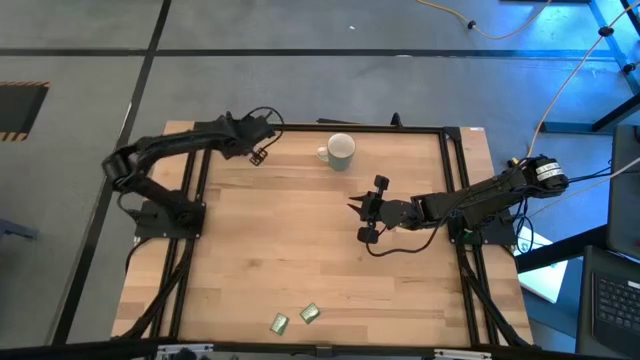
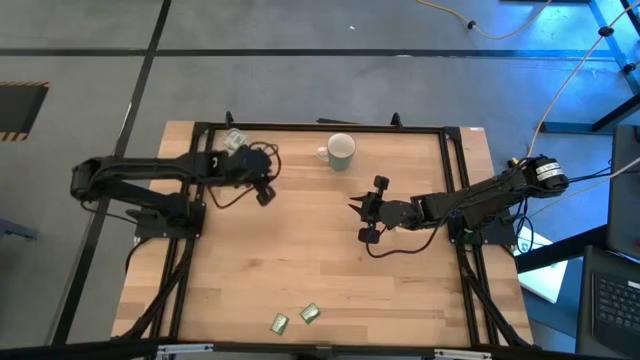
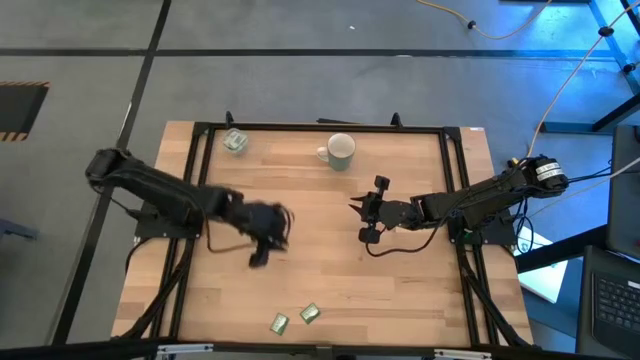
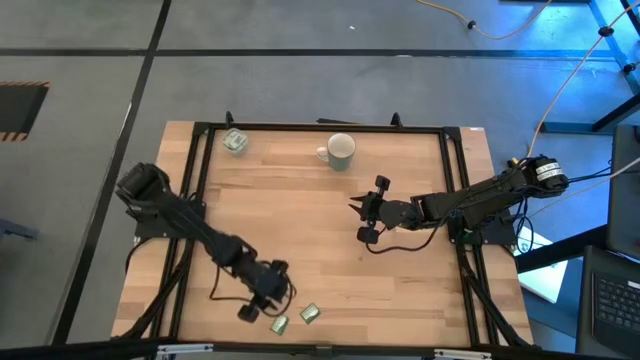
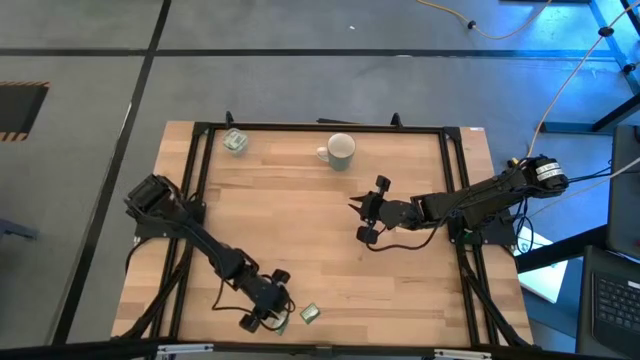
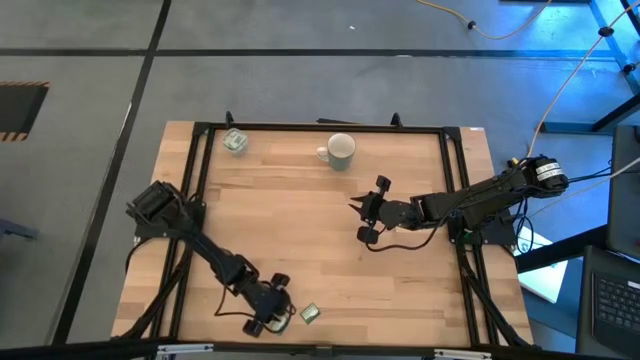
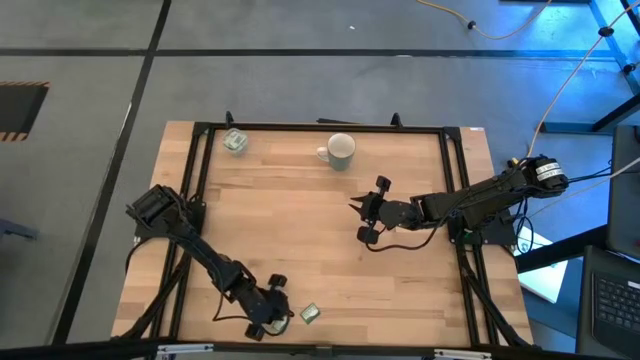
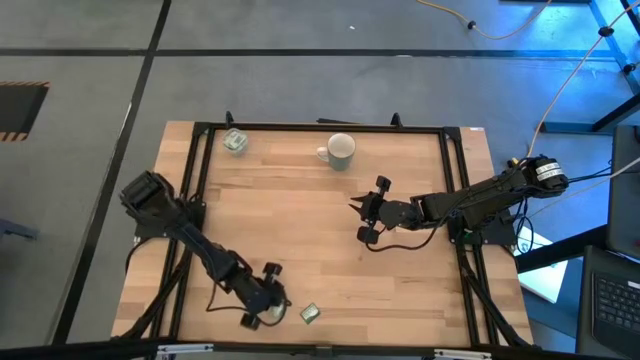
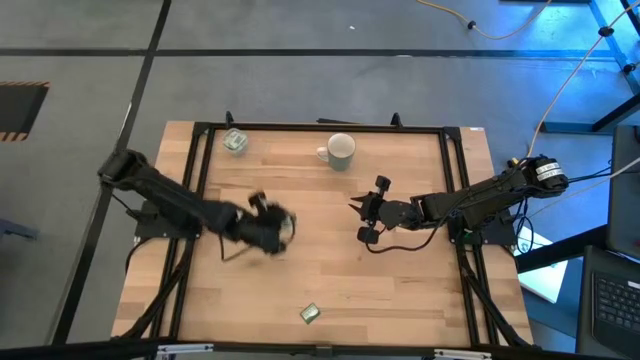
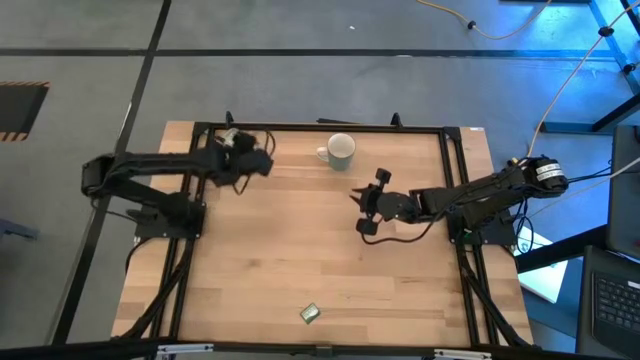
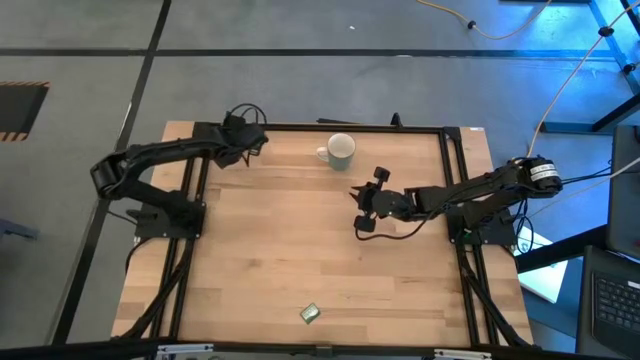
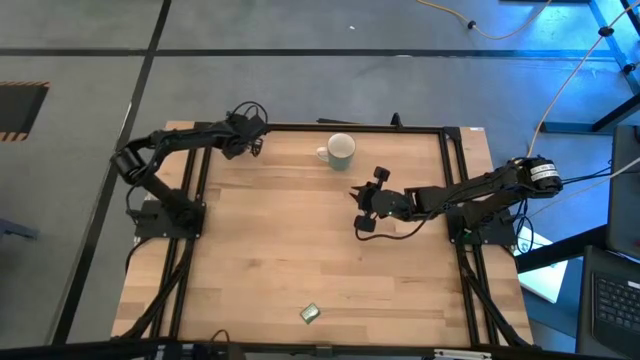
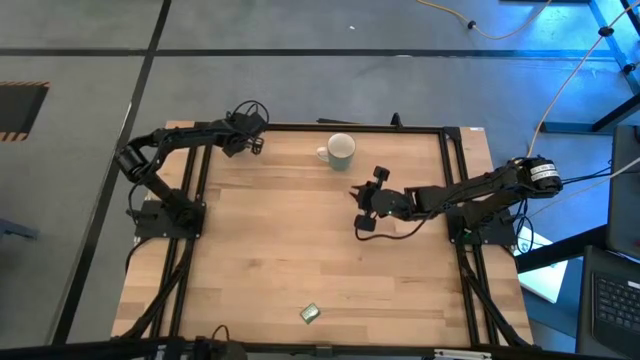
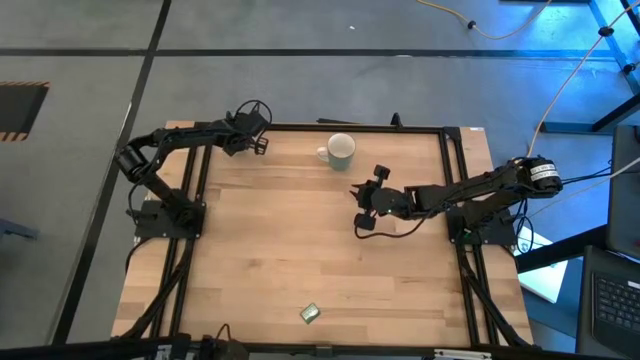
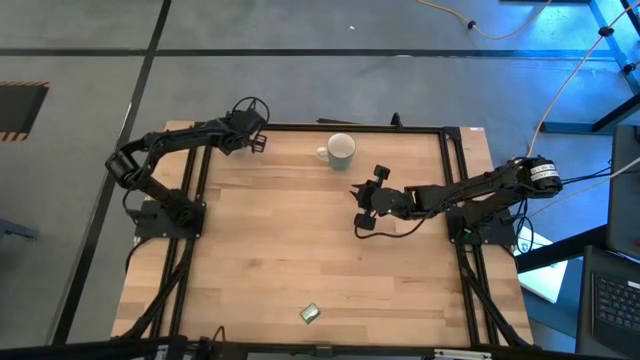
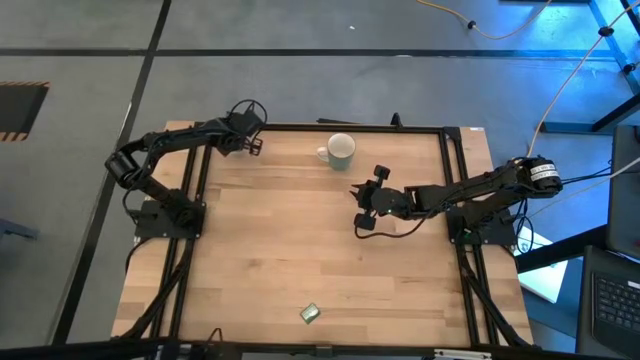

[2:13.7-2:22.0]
Task: Pick and place Stevia / Truvia into bins
Put the truvia packet into the transparent bin

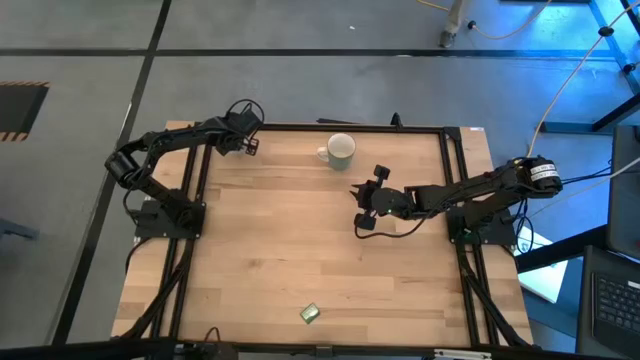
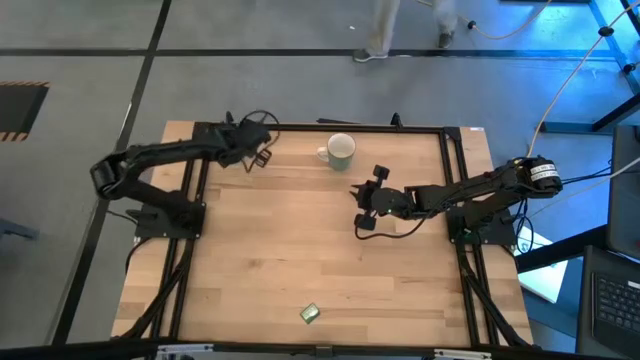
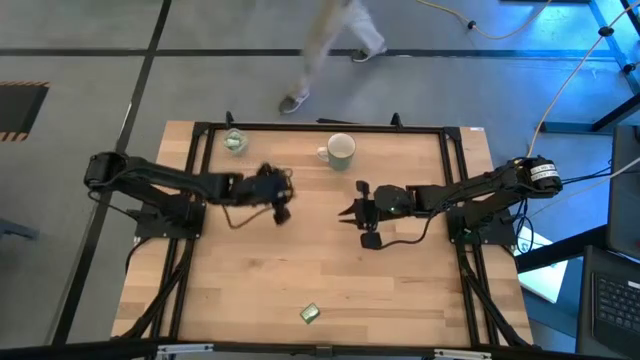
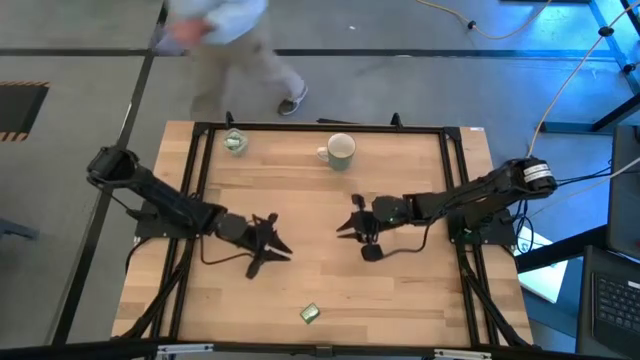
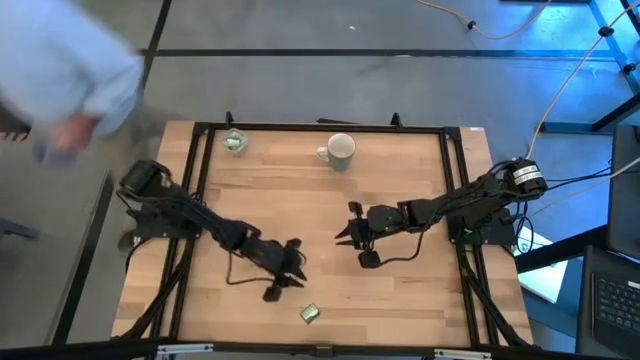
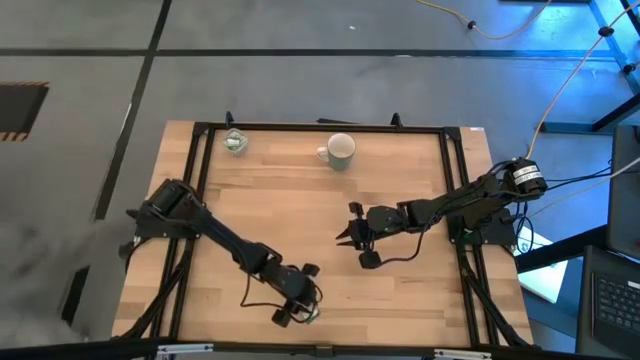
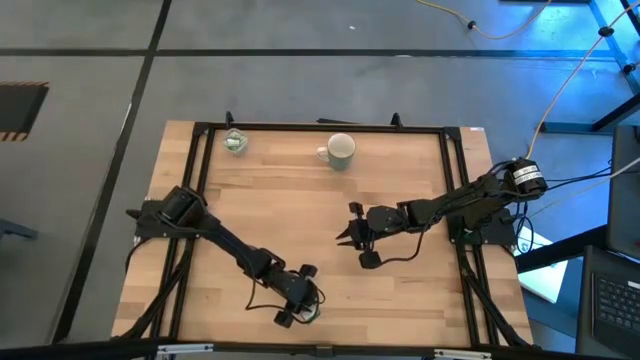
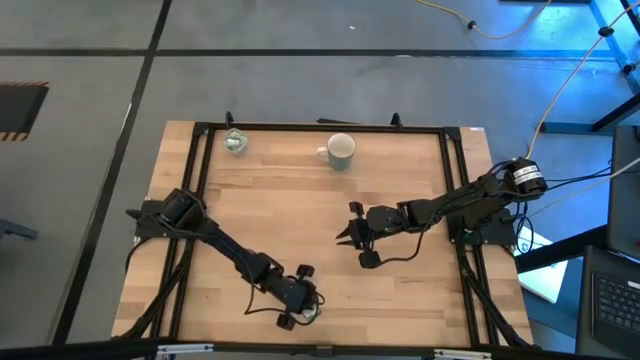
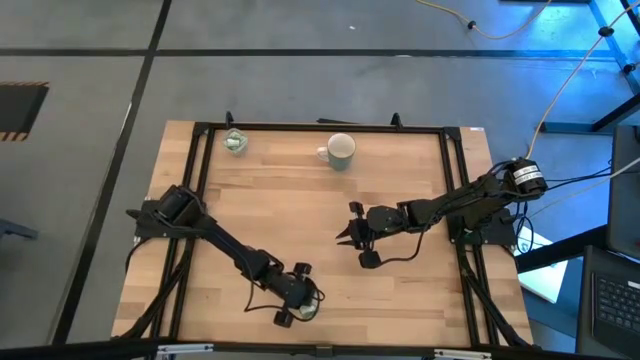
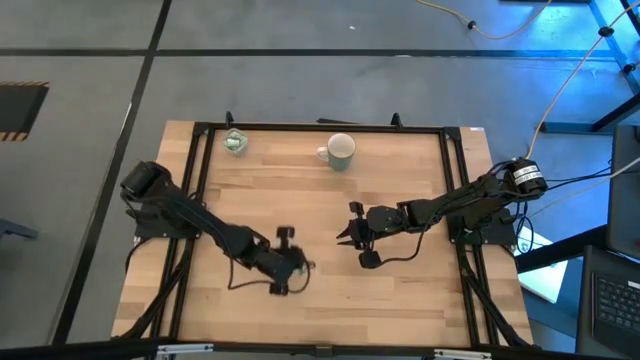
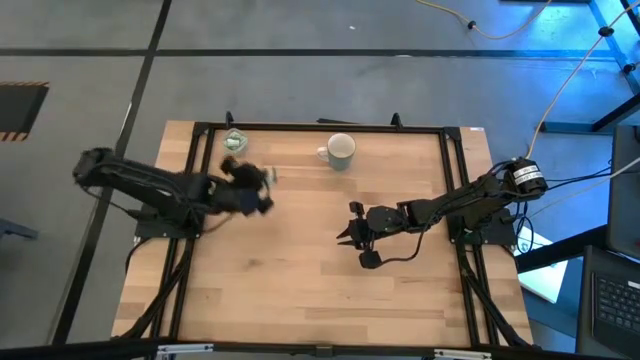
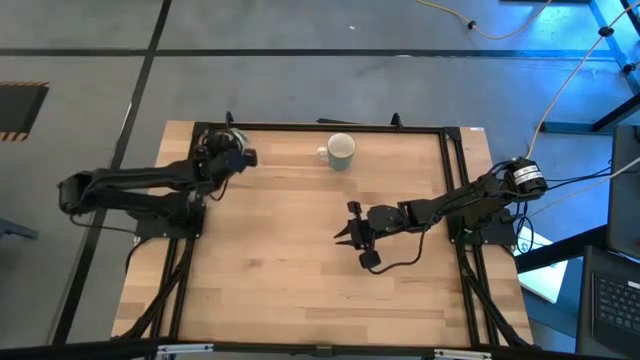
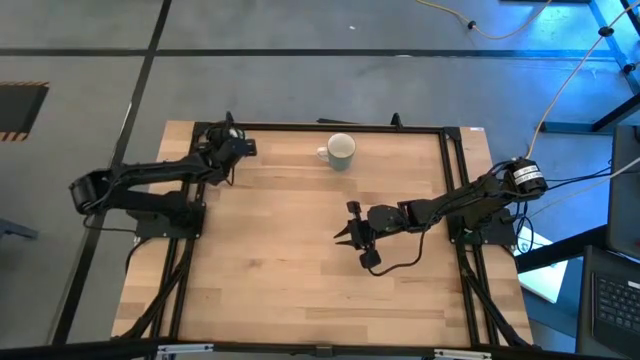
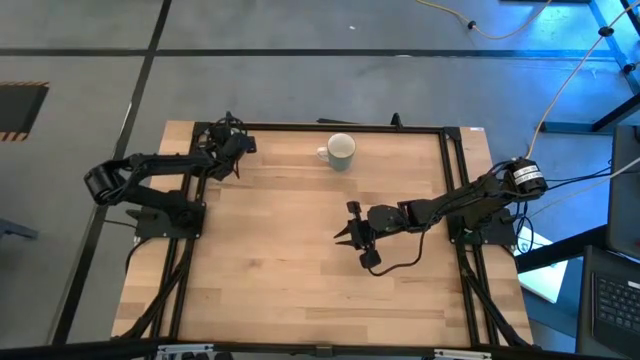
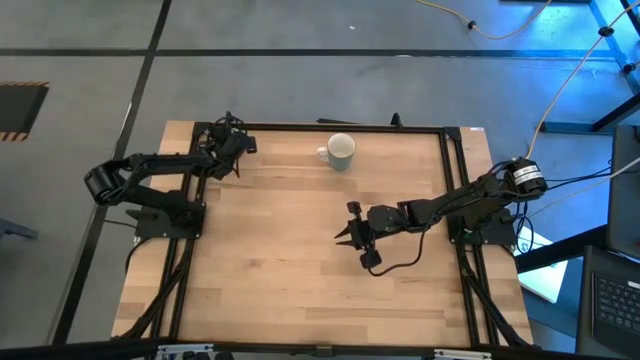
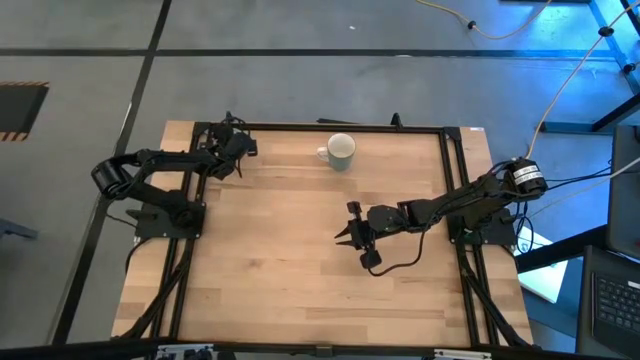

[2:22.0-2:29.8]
Put the truvia packet into the transparent bin

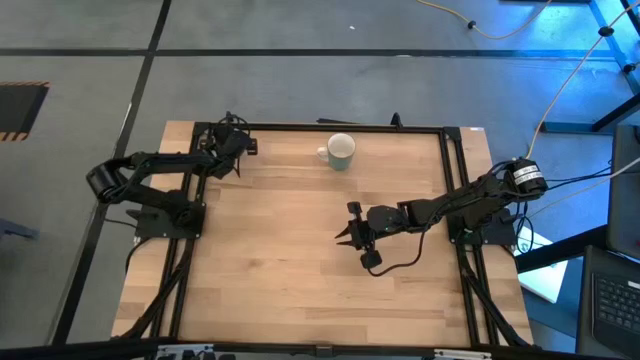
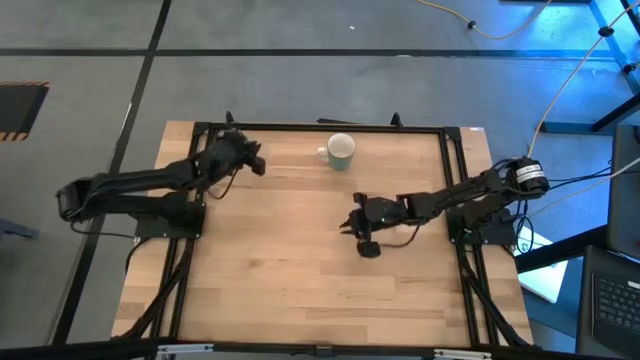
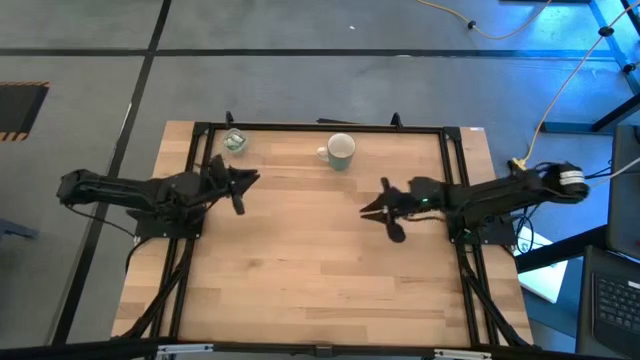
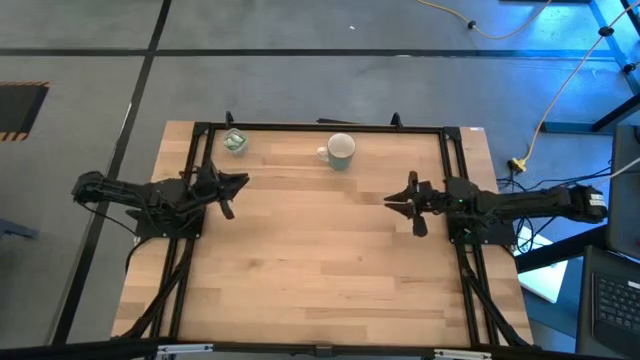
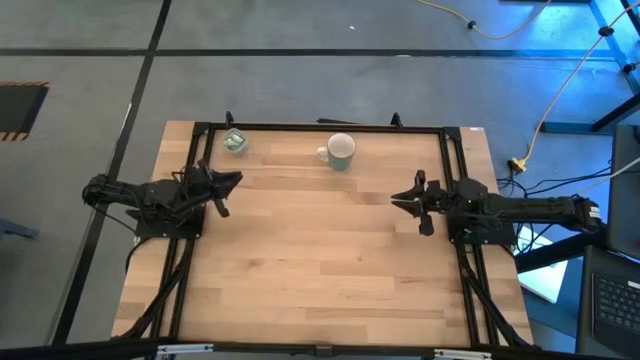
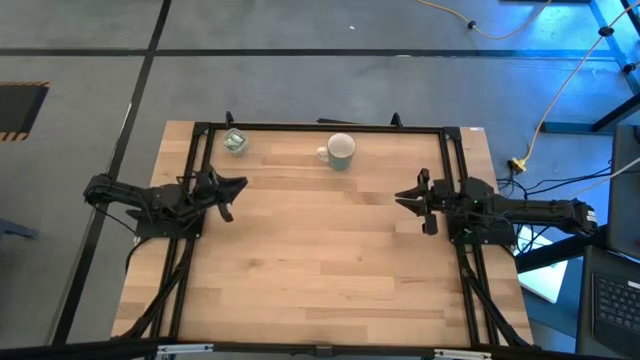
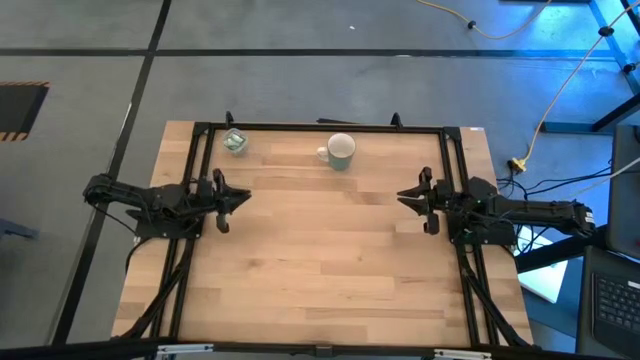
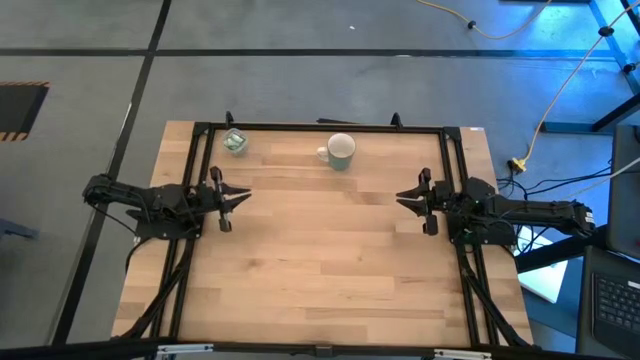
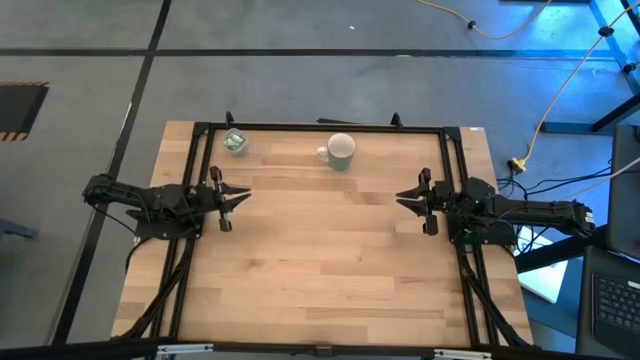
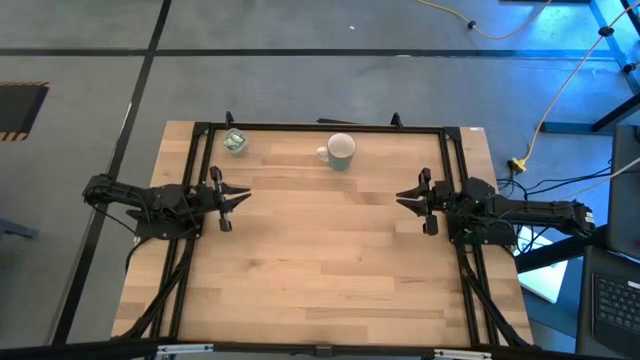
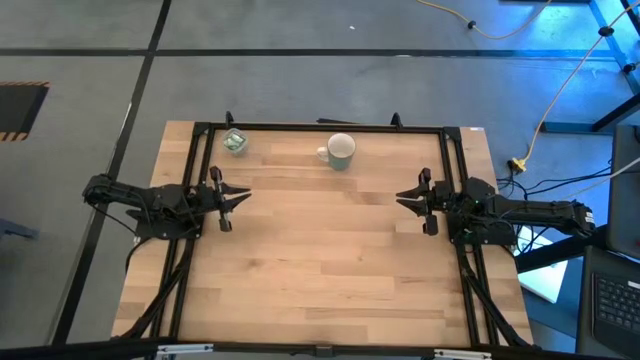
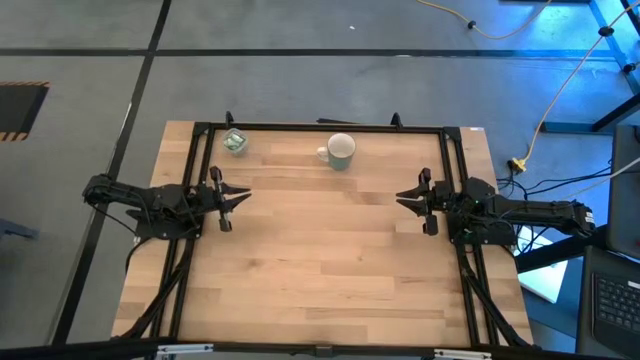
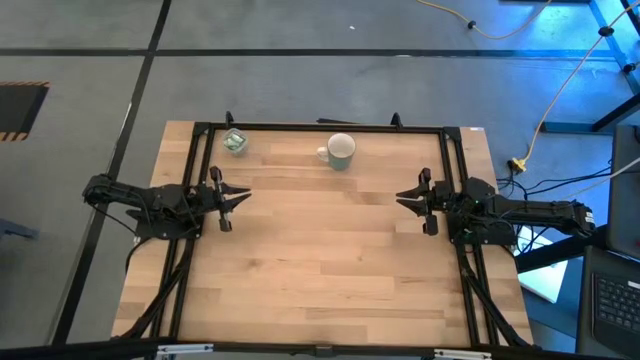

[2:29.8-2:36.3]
Return To Home Position
